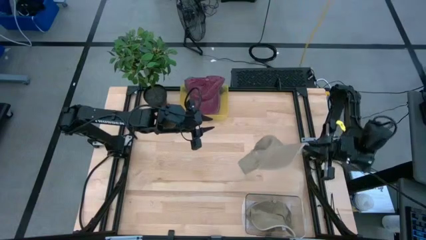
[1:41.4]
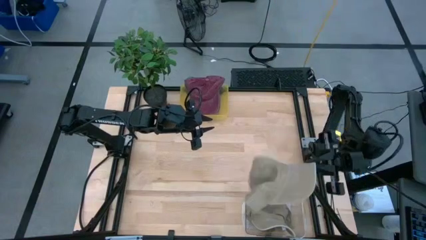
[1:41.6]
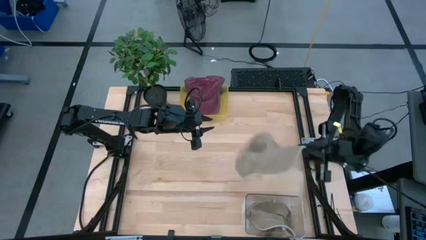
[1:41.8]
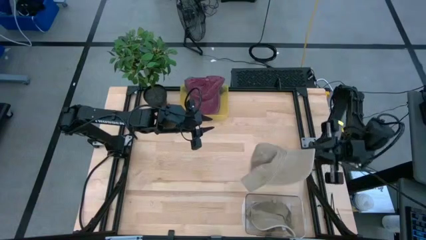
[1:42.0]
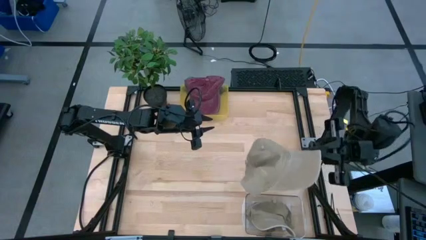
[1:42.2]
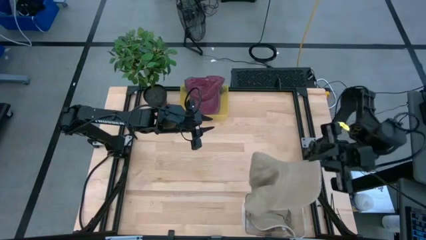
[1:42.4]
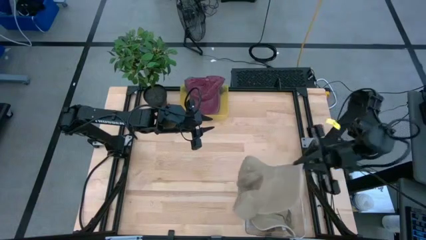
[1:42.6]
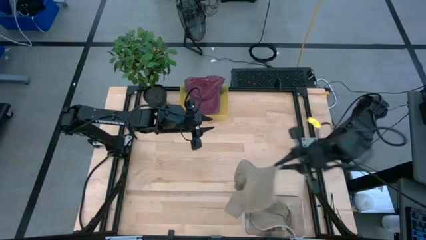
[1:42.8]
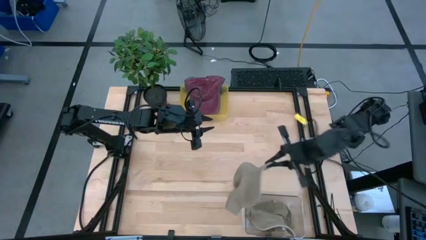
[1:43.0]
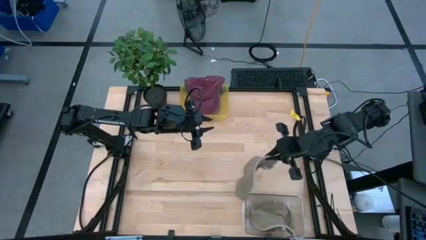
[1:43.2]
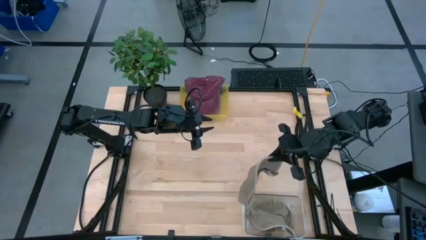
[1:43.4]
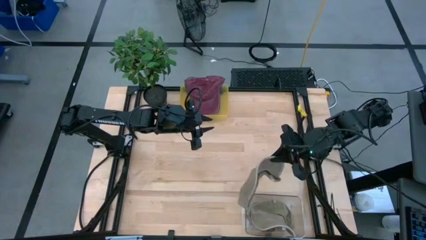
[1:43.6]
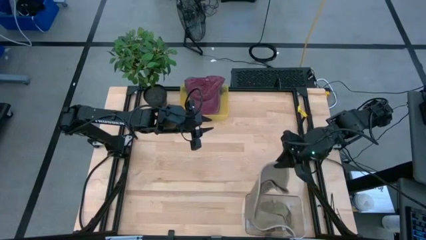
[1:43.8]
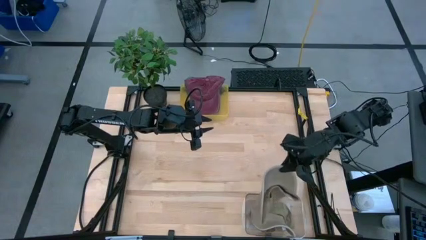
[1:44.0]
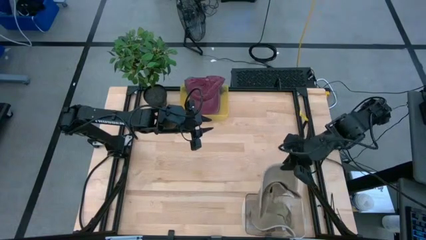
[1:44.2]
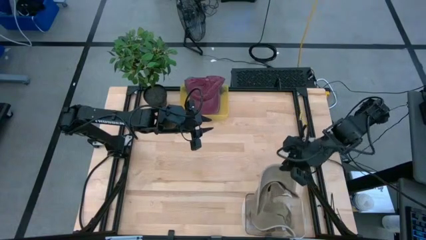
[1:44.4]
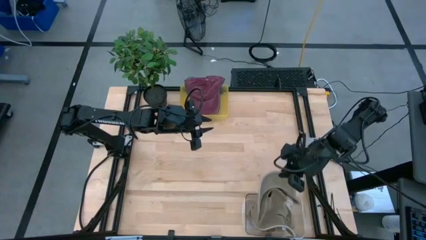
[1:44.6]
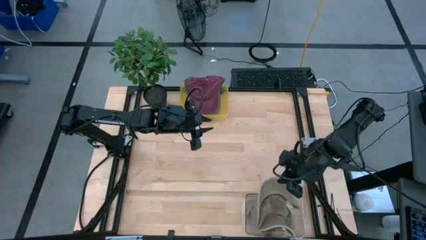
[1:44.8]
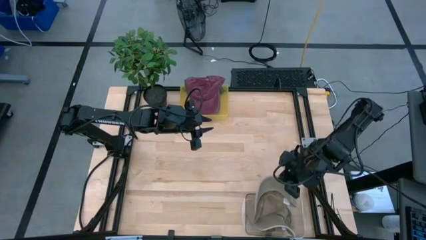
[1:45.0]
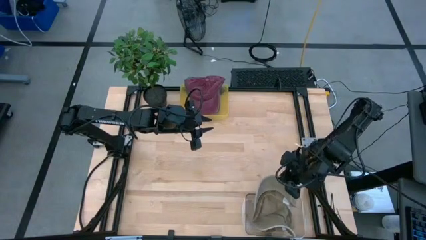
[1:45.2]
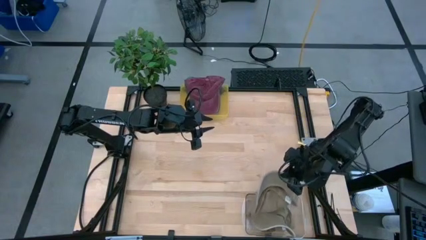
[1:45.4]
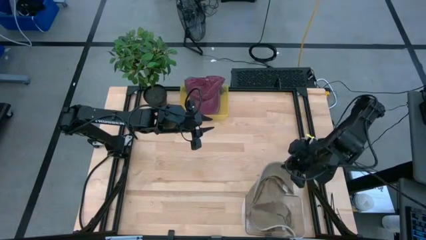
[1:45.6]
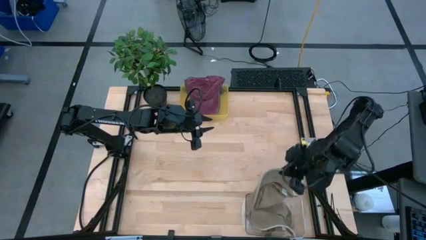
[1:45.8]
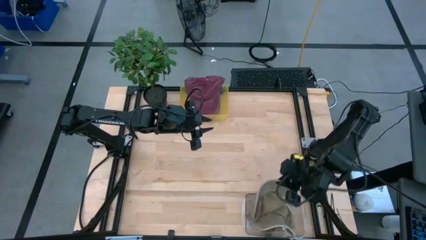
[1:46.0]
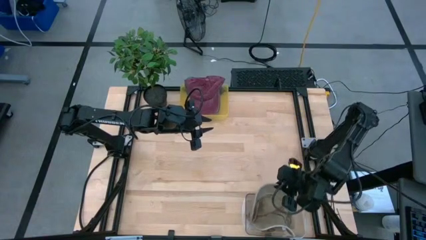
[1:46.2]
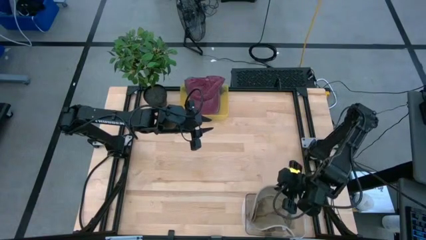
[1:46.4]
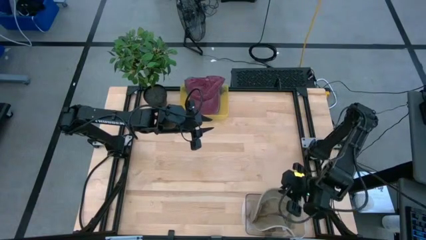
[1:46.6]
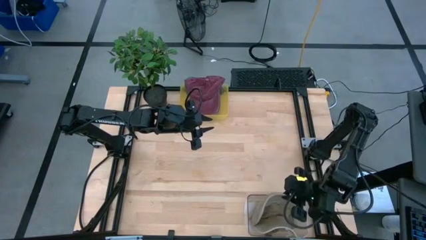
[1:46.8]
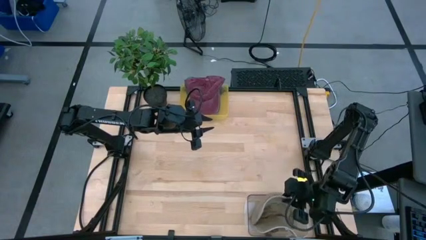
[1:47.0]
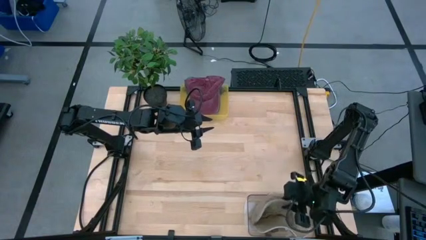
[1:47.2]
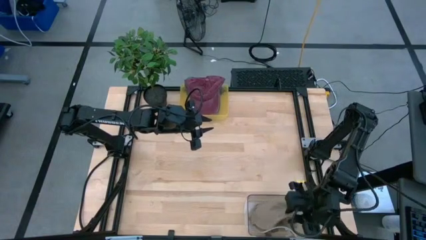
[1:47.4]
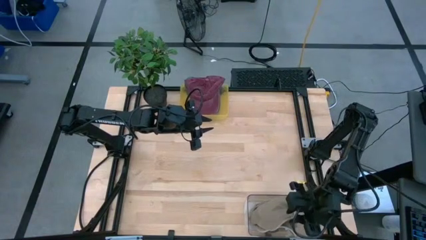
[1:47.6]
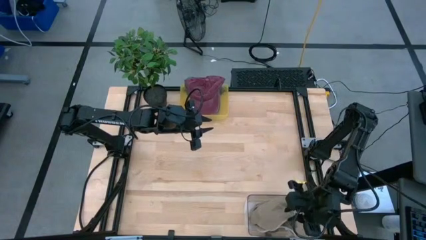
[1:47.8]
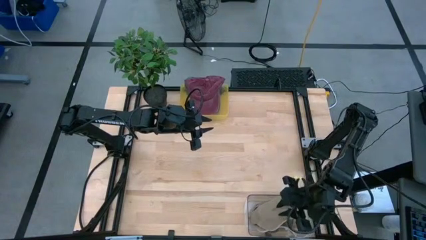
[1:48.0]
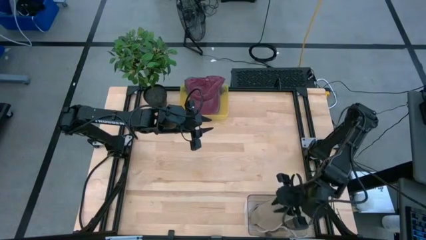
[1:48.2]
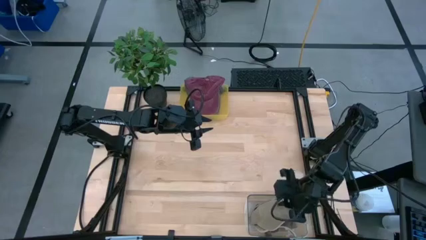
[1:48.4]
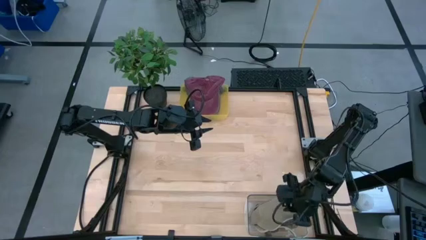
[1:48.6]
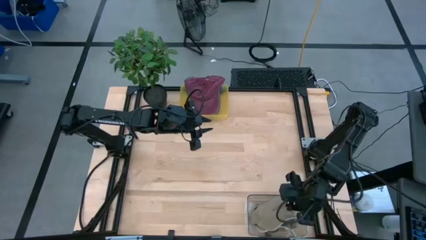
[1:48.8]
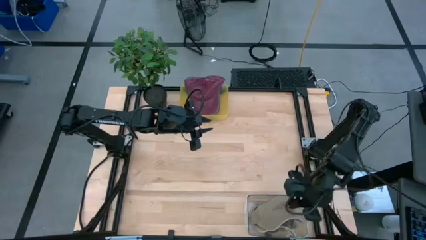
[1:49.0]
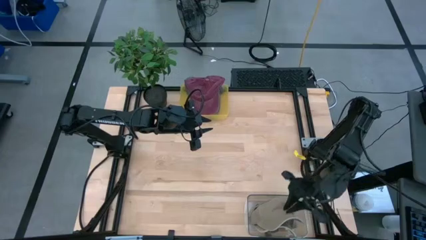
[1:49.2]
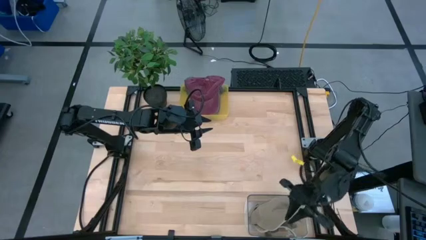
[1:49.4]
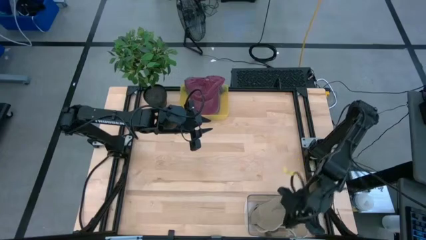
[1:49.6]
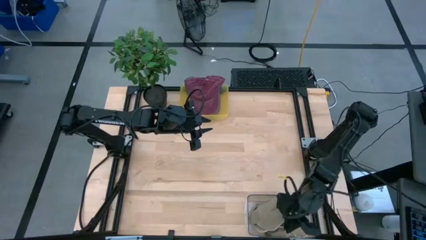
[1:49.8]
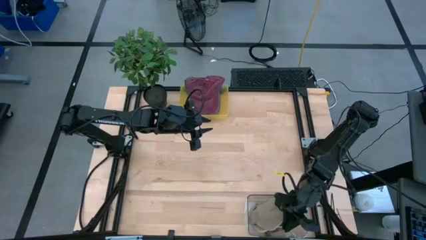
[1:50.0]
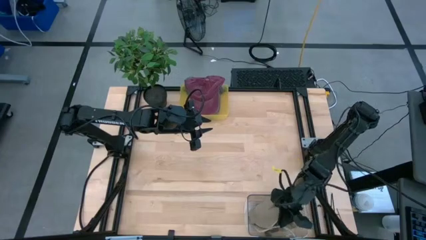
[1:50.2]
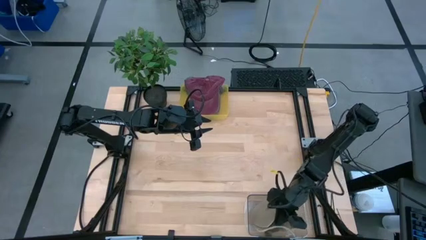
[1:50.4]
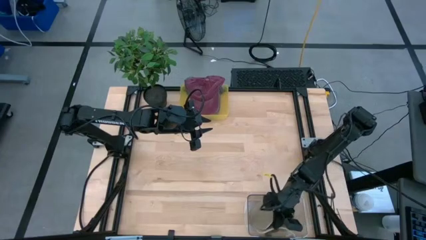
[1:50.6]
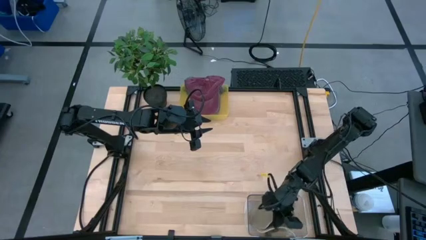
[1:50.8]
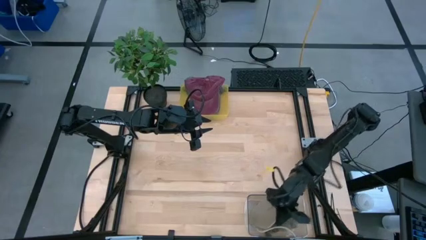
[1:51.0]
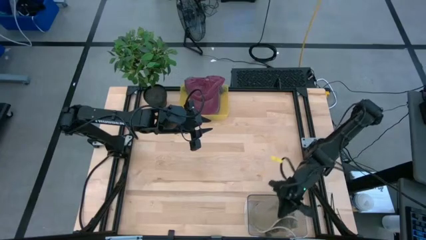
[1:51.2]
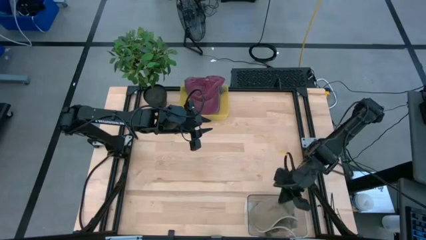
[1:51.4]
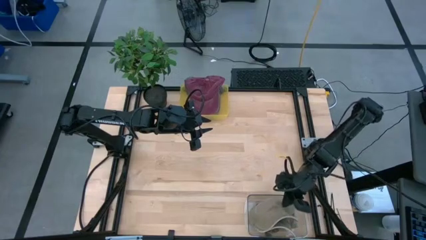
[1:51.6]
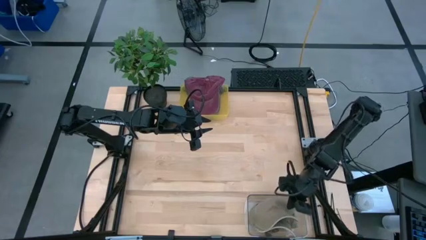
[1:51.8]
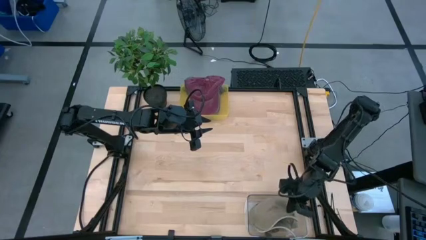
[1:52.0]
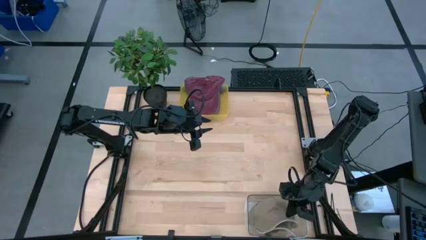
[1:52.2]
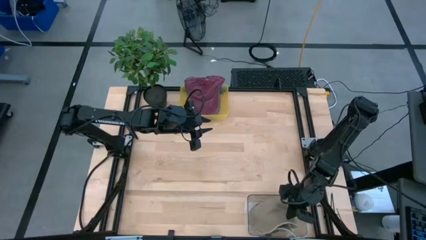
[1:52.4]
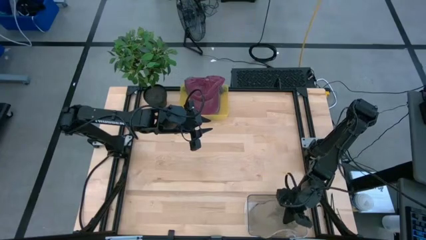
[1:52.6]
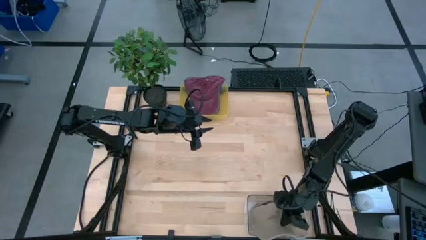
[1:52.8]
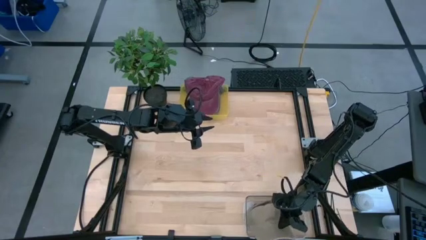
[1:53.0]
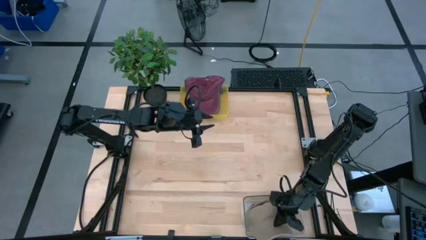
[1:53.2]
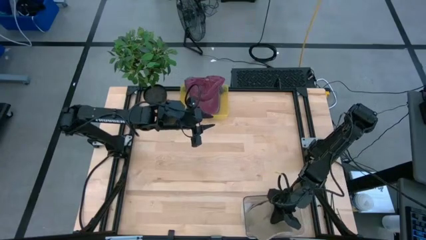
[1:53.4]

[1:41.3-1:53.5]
Task: Pick & Place hat
Put the brown cap into the transparent bin
